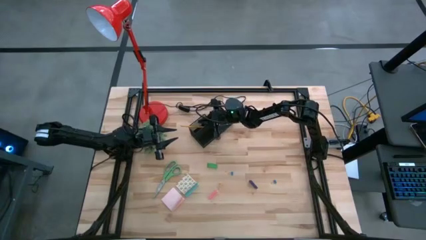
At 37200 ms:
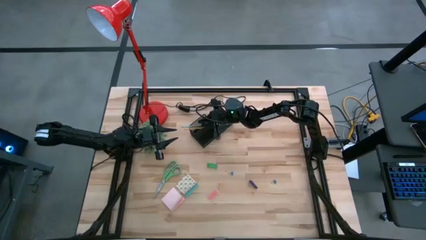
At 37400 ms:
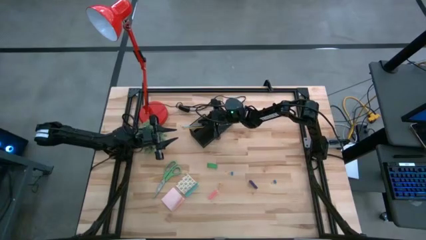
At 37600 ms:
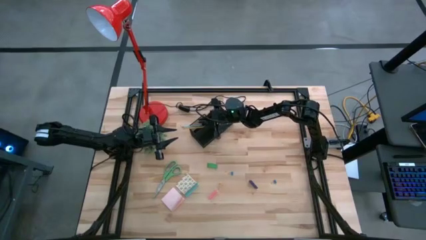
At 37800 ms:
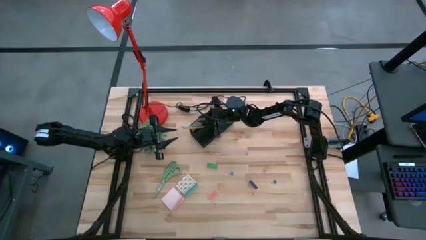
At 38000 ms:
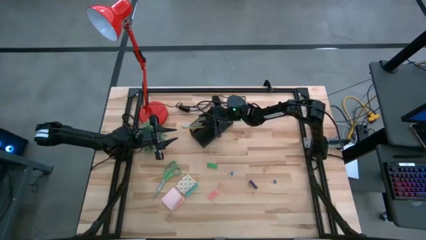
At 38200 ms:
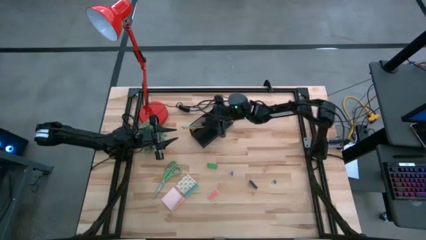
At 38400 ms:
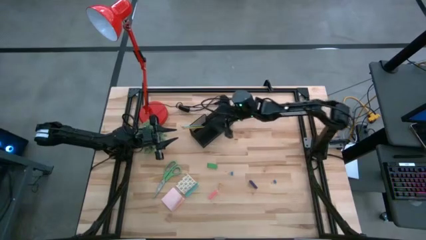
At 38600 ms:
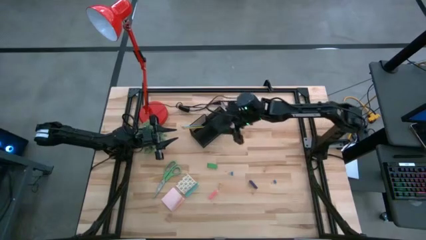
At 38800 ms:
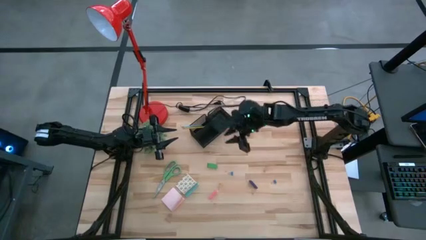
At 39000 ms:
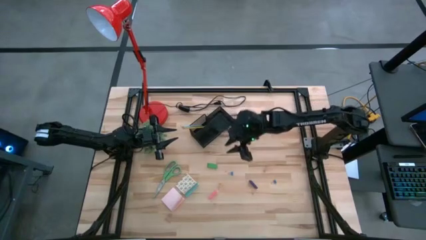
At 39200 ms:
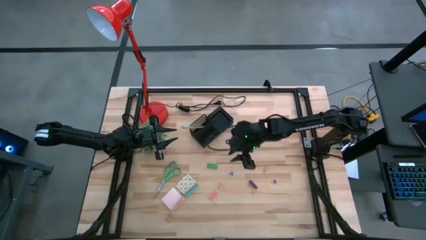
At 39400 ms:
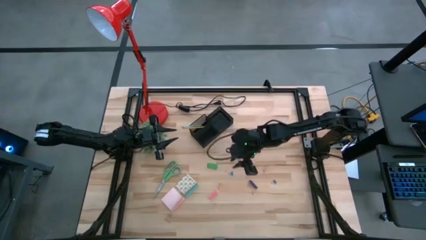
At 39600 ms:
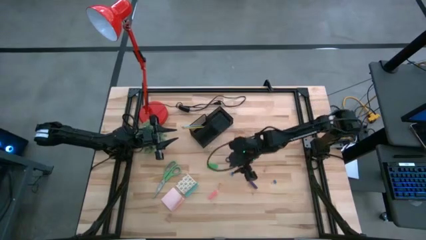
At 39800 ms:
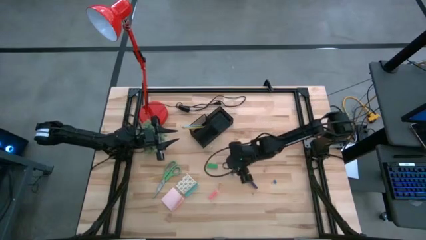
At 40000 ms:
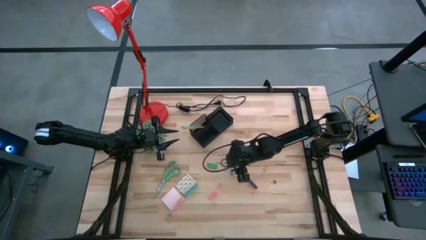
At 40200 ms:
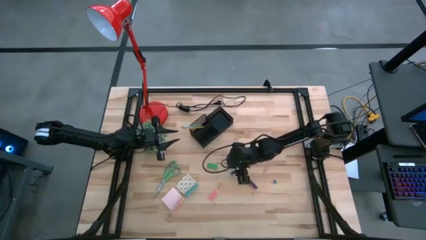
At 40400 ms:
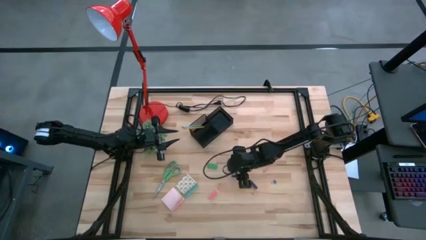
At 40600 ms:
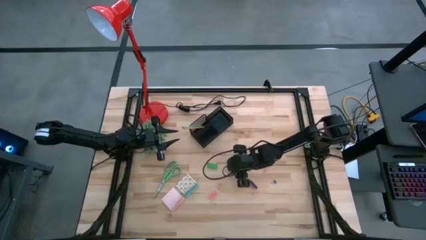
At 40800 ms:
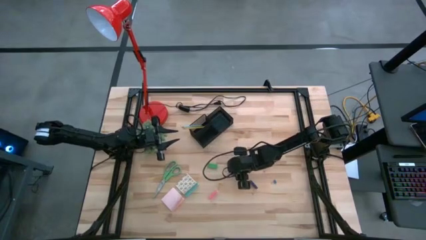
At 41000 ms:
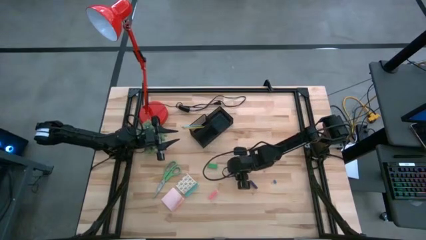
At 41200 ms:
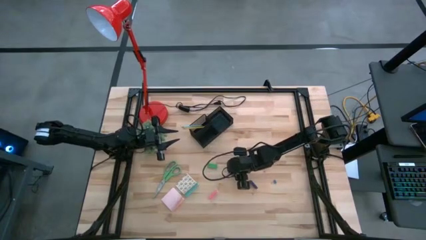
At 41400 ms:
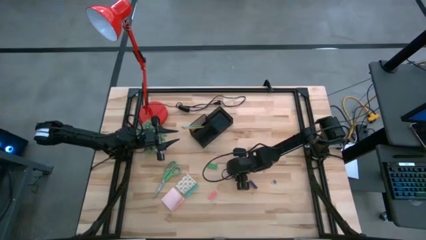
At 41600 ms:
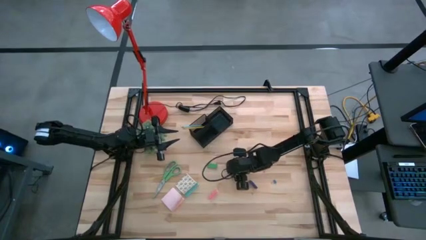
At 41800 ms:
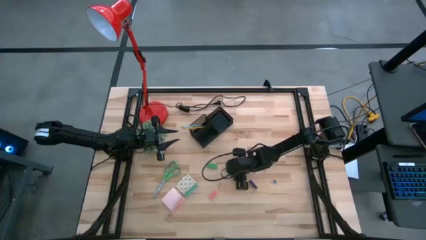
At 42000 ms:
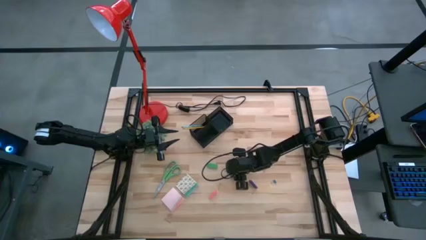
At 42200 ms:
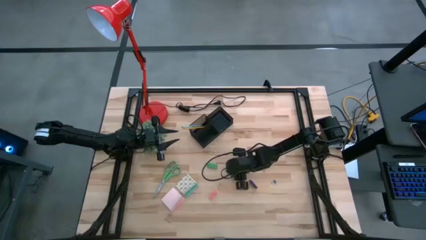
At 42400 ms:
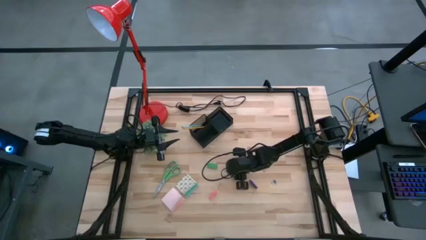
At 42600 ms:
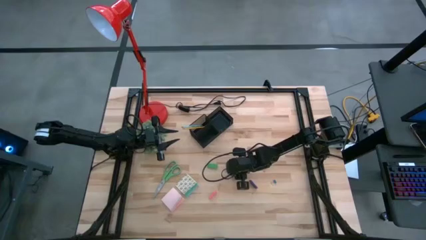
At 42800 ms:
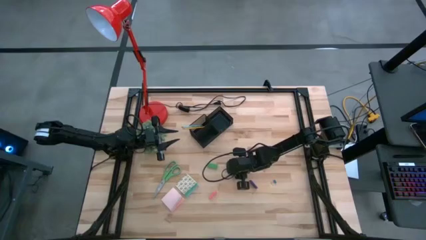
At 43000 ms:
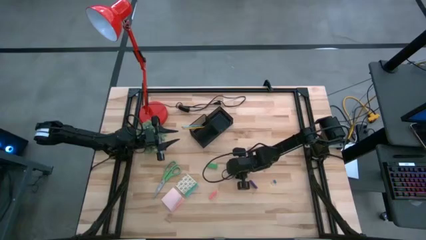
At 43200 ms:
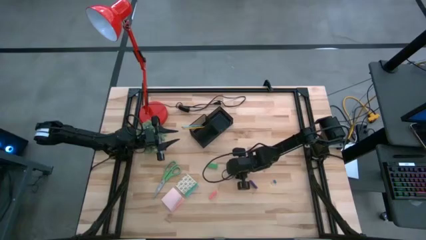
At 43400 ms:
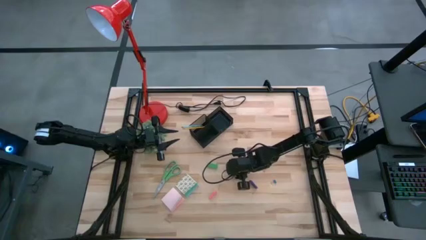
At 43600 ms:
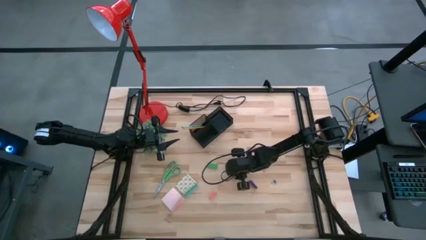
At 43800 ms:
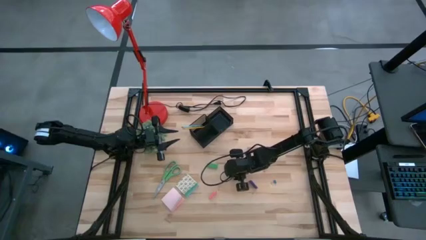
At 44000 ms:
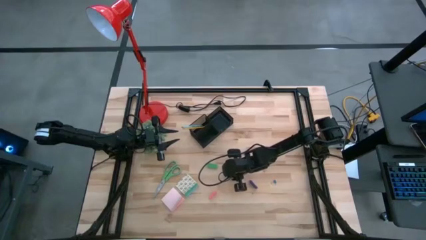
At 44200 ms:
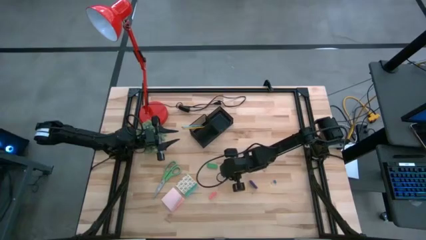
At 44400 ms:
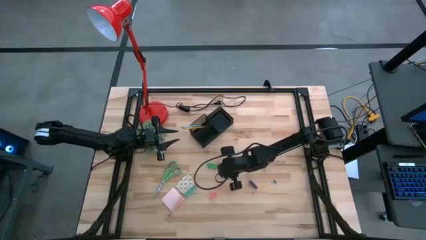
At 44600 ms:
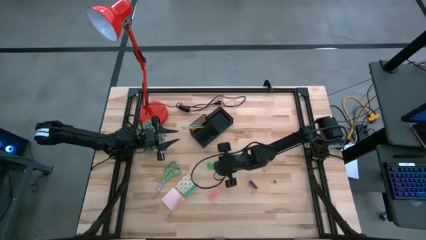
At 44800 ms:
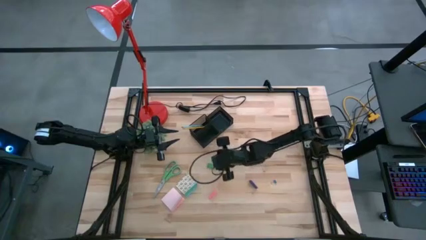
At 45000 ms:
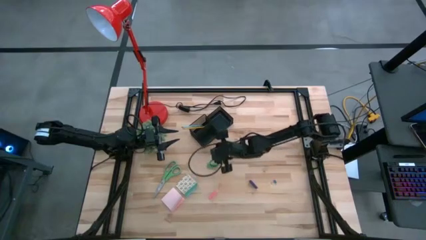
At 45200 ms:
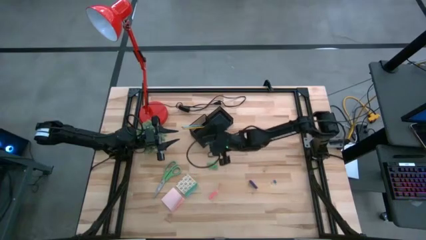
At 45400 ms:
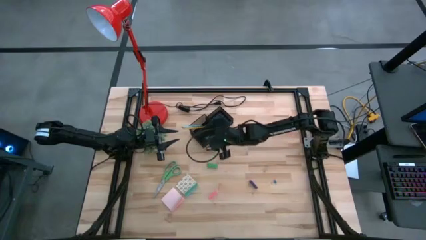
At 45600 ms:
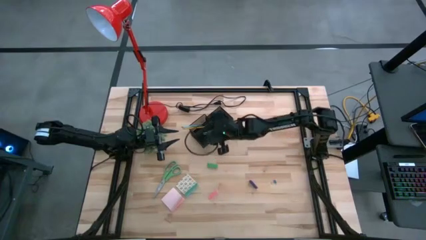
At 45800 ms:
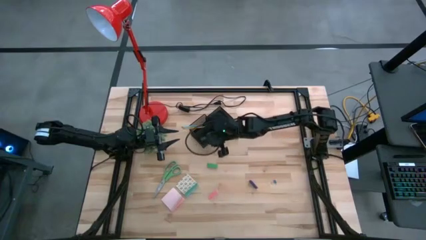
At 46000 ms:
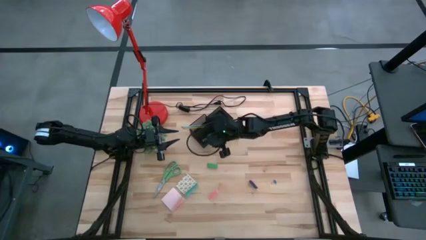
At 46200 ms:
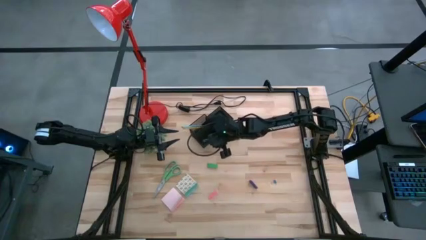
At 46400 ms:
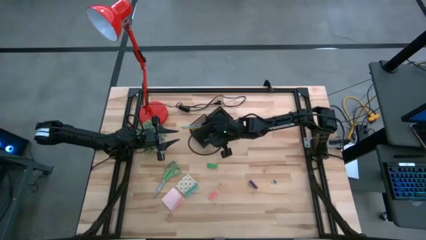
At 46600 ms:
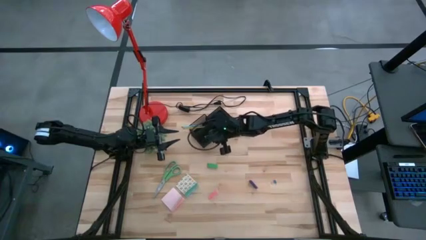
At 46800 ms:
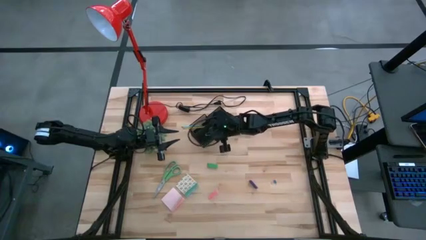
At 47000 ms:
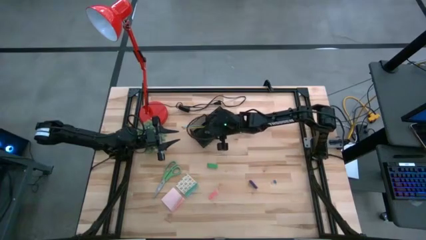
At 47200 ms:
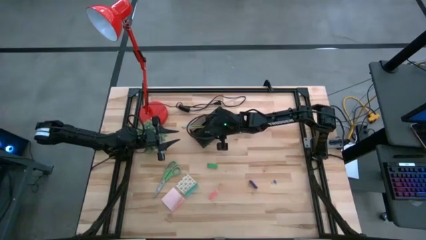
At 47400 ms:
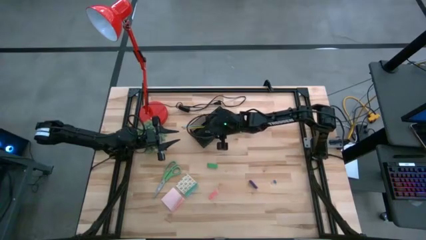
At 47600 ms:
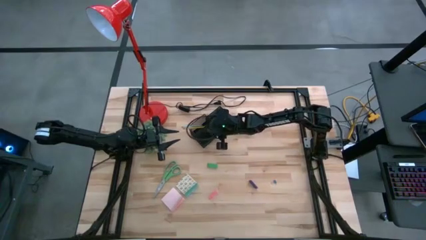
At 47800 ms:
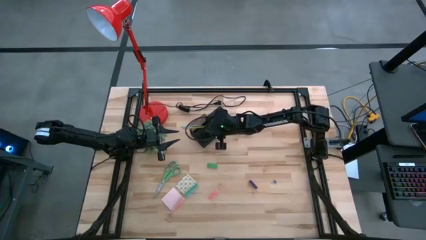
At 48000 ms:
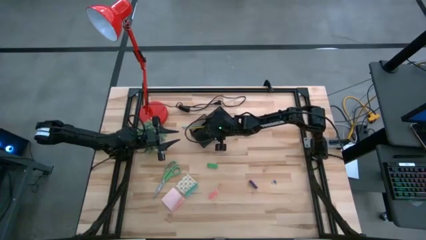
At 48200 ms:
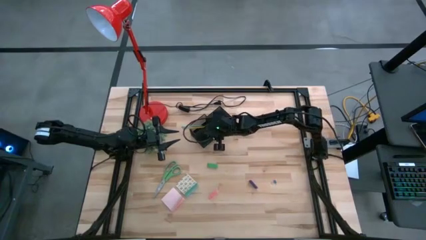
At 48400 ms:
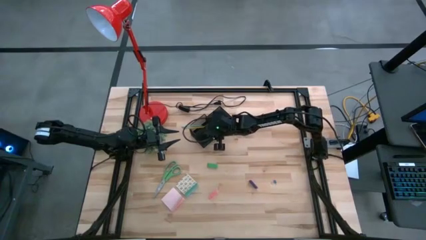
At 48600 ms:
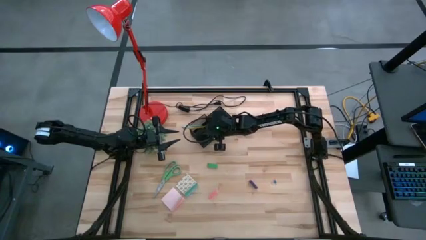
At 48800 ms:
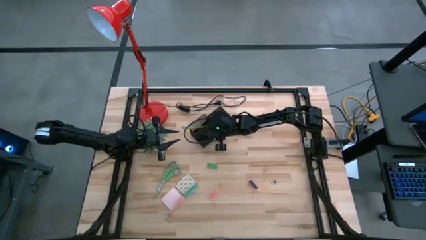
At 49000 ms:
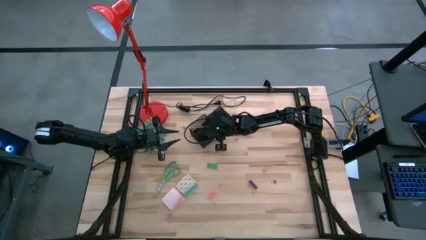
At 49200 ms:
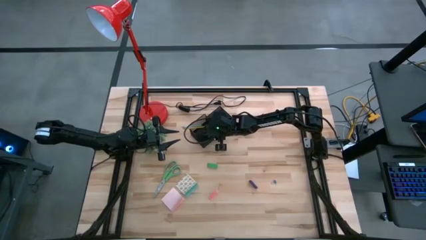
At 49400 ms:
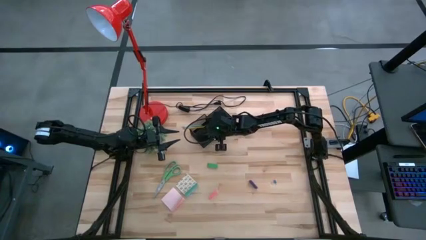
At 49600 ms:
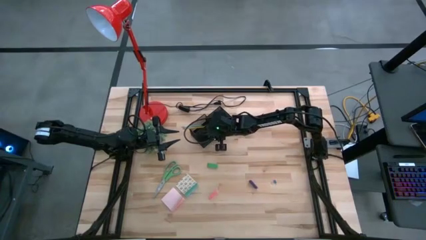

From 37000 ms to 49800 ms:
Task: Pick and place office supplies into organizer
Put the left blue binder clip into the black desk organizer
